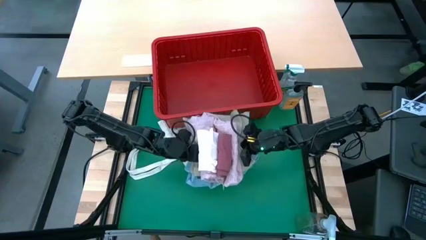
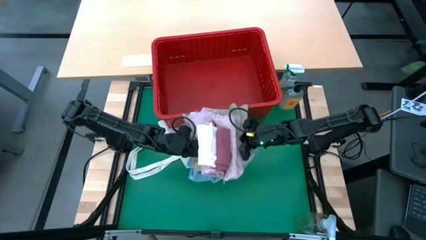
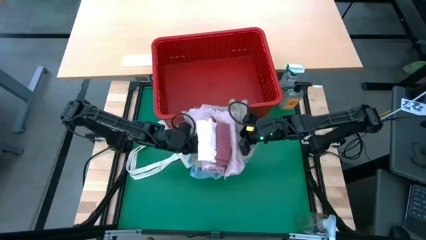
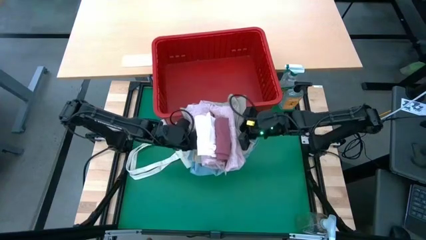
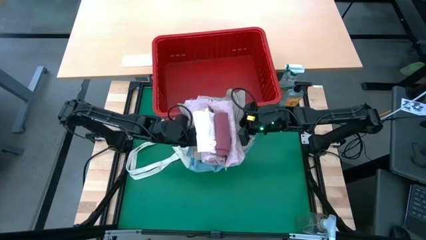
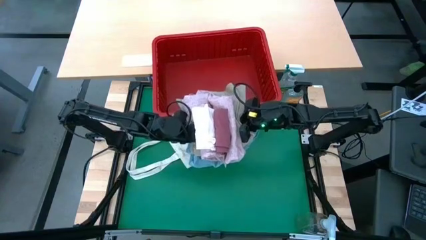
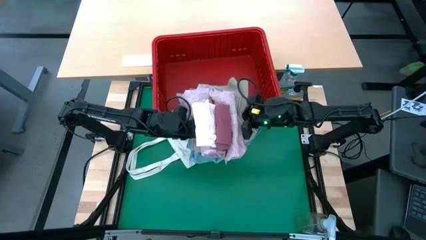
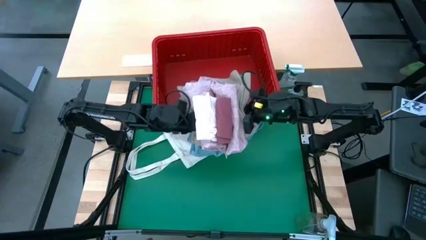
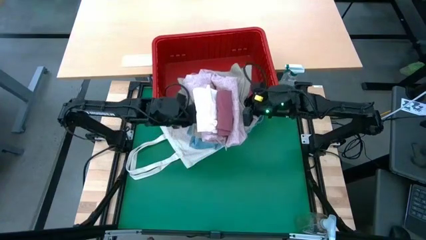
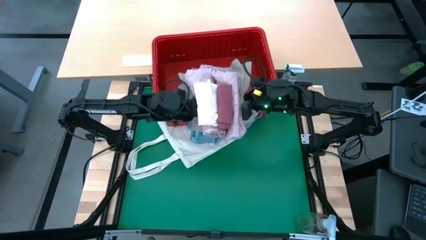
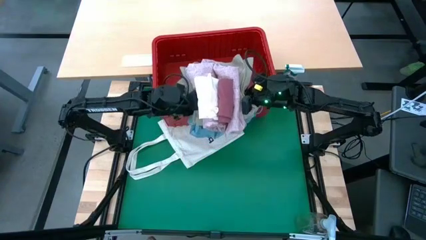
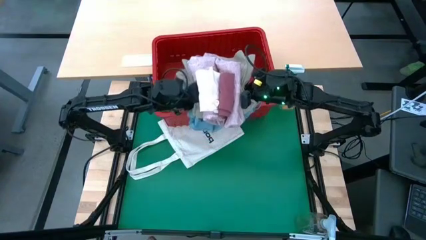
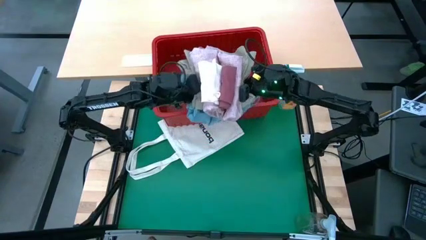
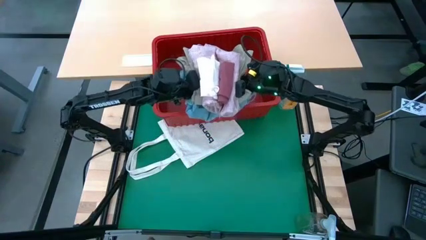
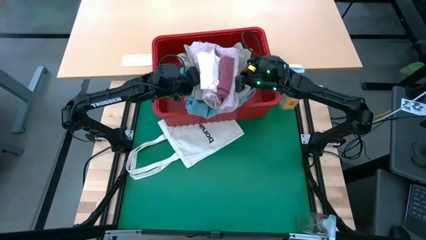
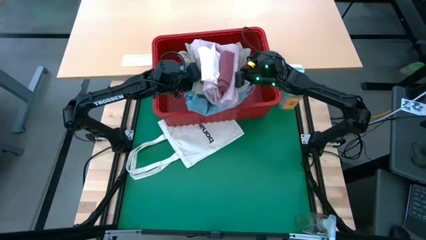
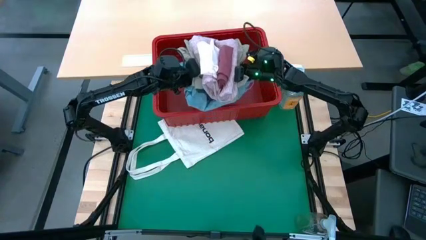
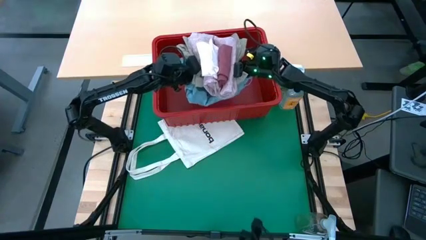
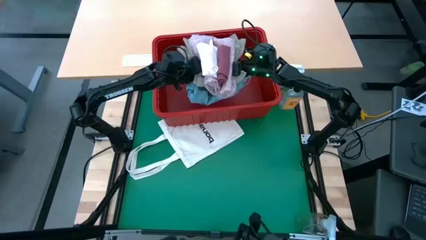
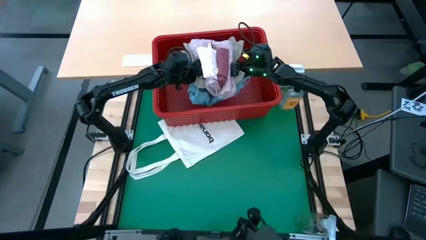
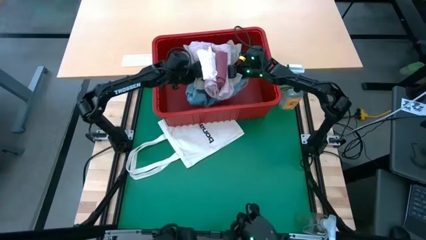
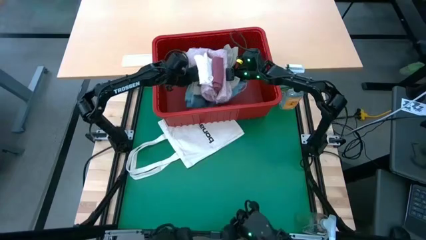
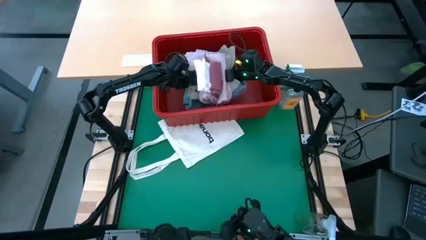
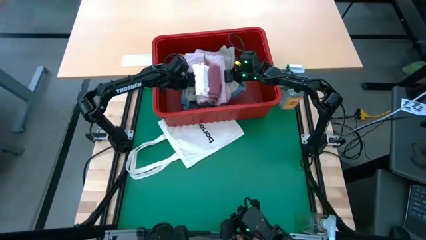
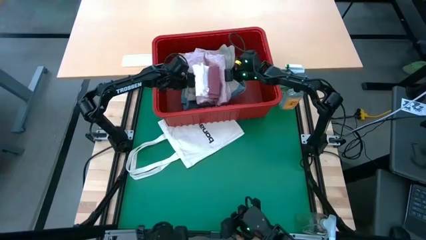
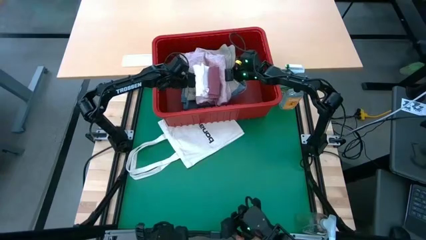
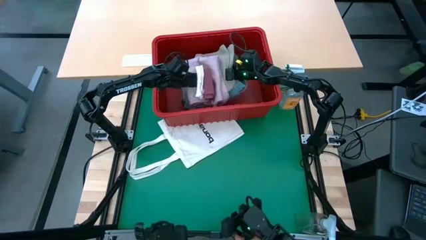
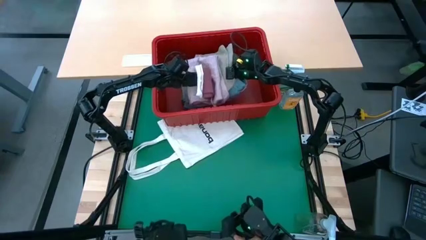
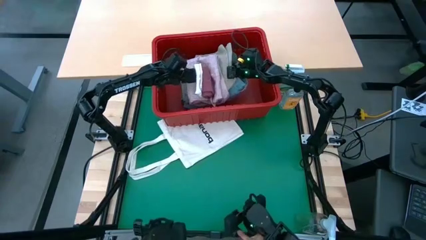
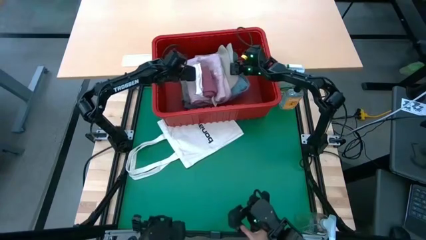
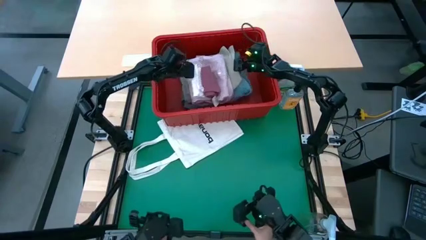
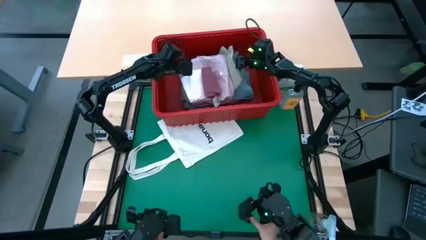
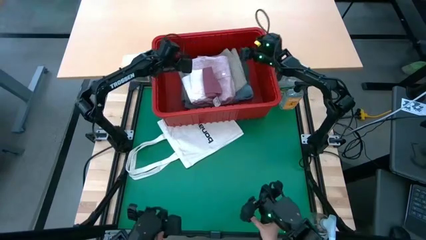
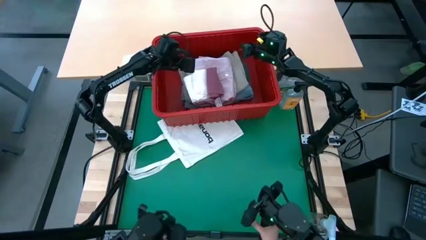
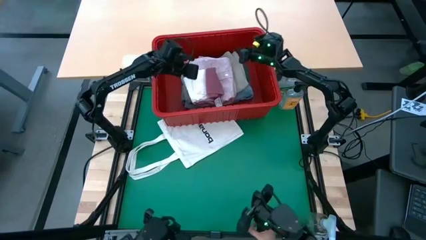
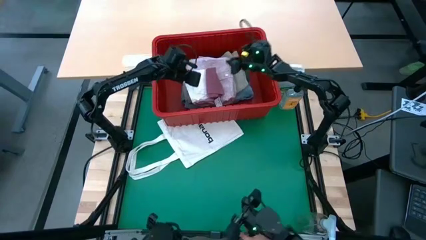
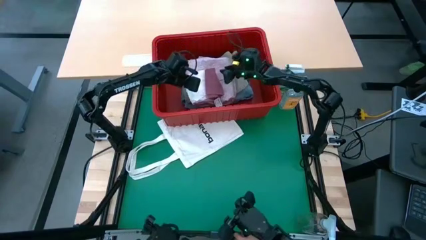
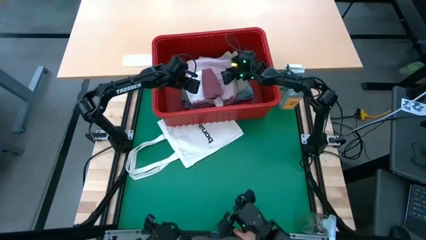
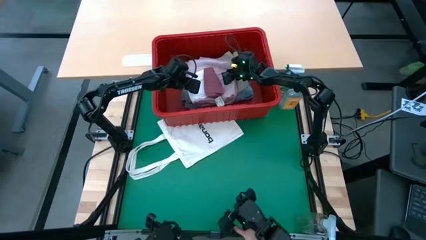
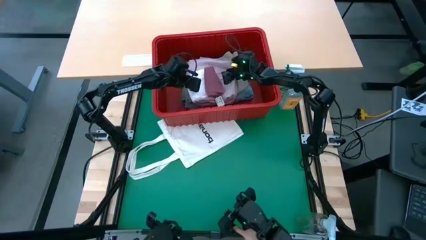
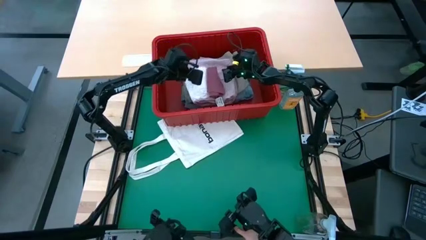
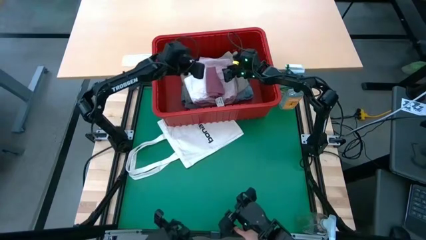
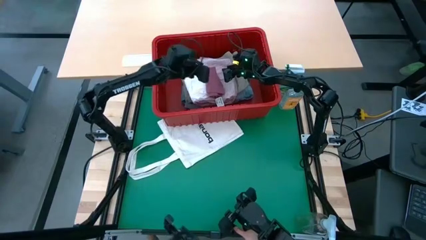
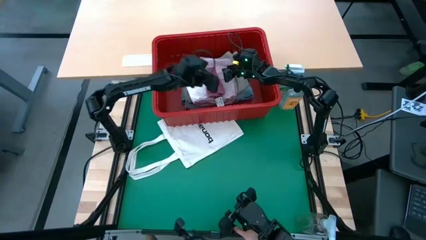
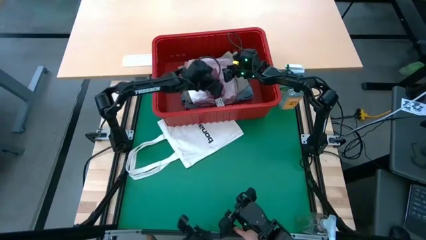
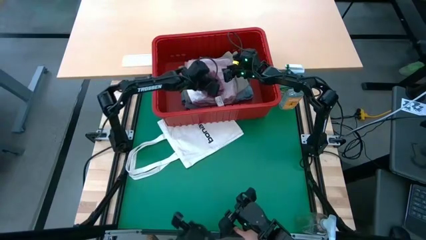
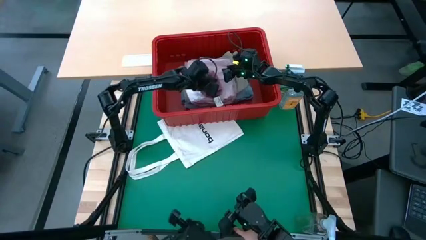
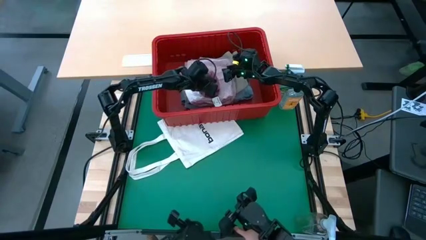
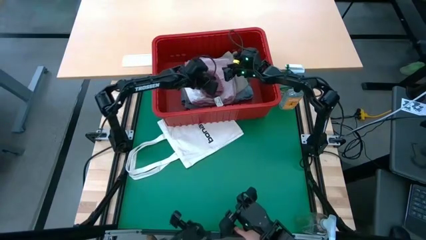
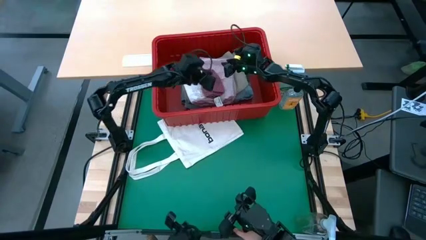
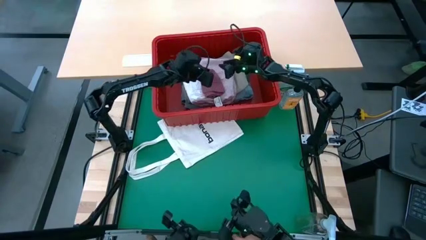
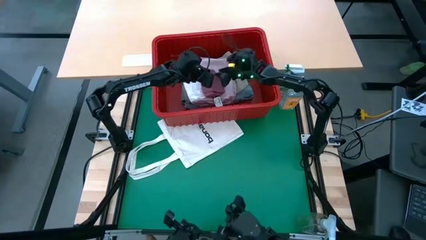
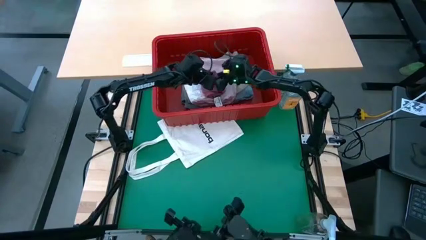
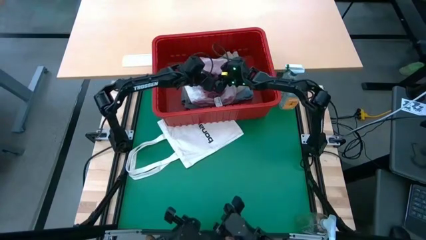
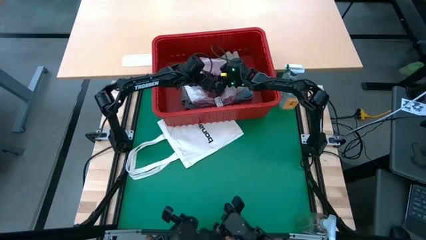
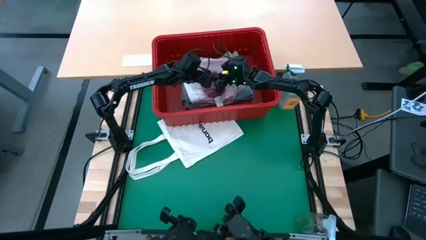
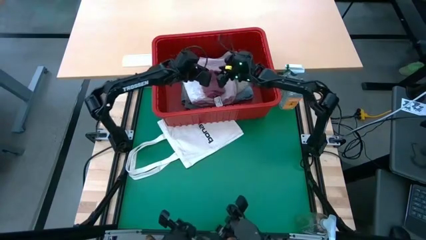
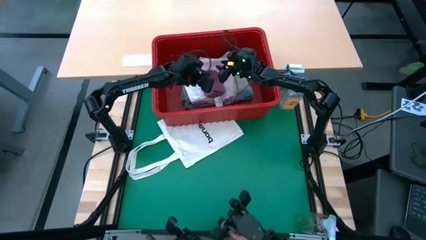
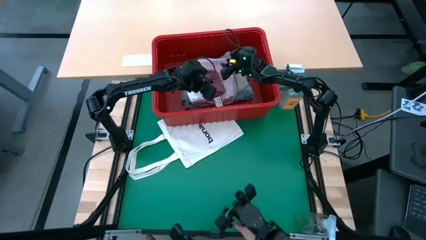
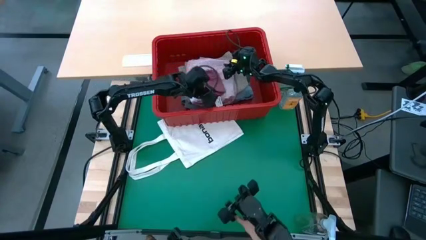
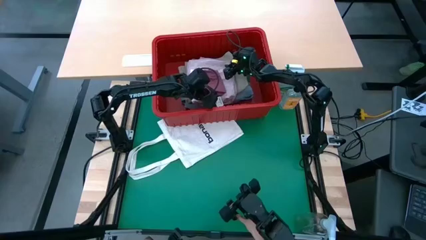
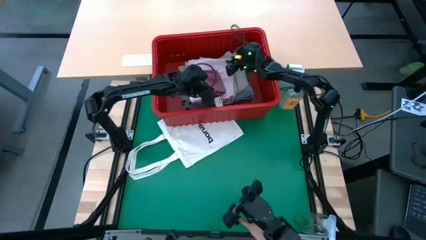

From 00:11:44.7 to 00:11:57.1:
Task: Fold laundry
Put the stacked clothes into the red bin

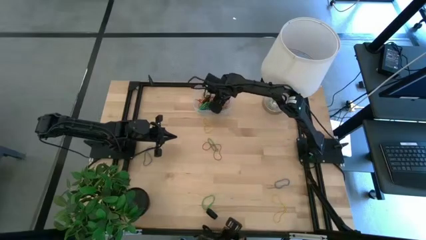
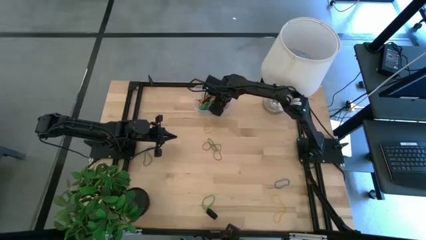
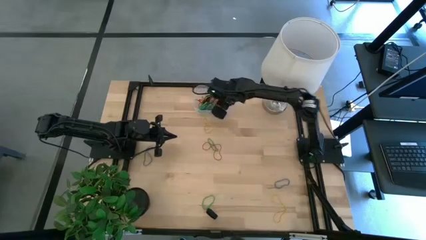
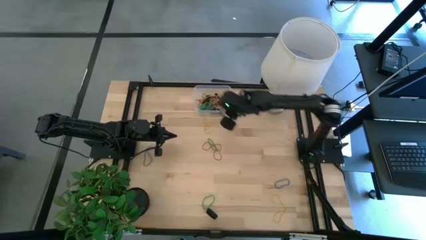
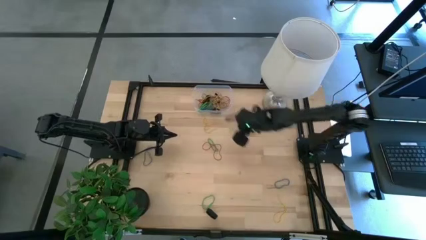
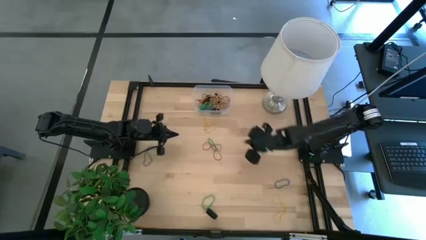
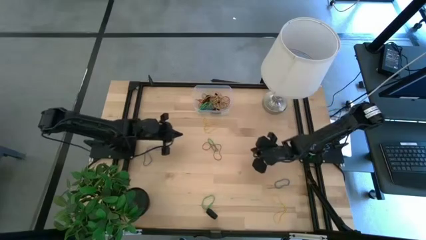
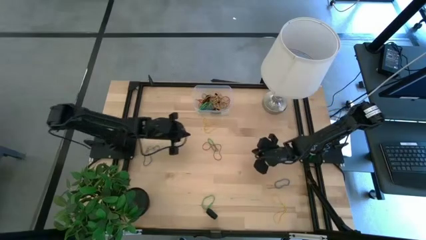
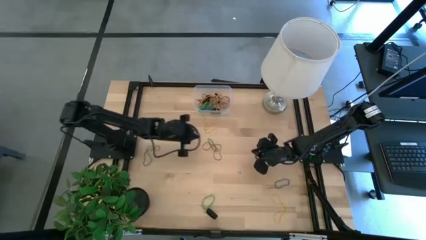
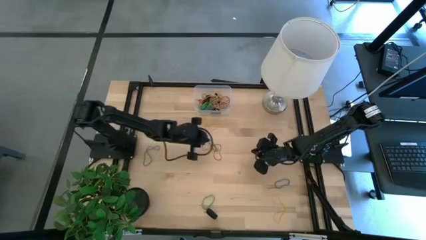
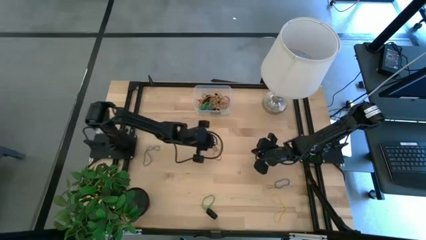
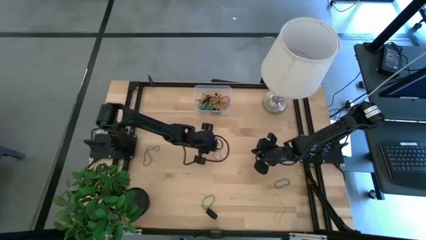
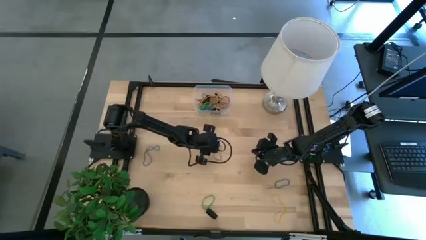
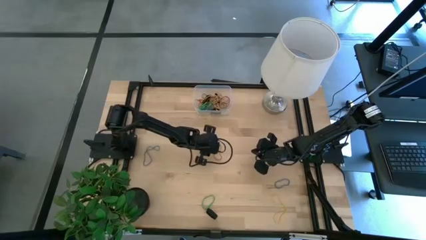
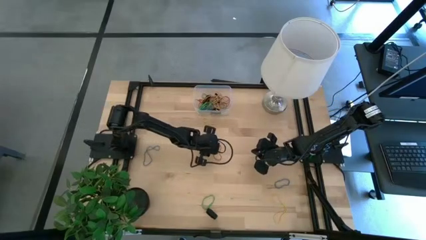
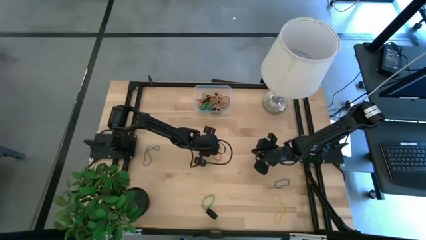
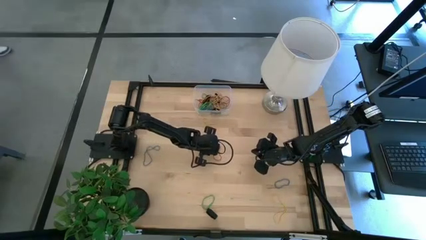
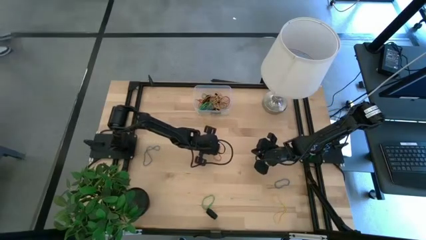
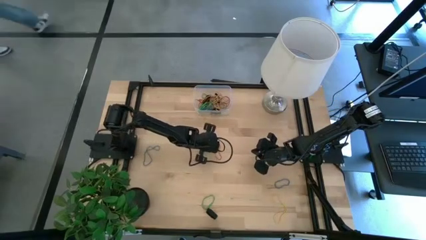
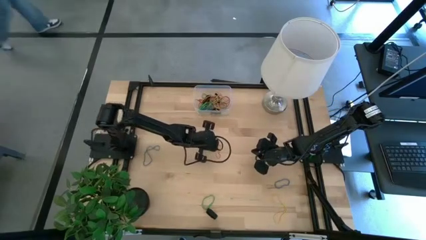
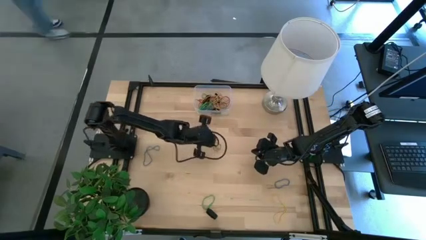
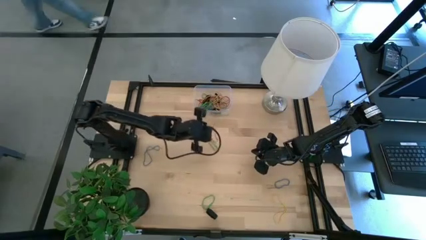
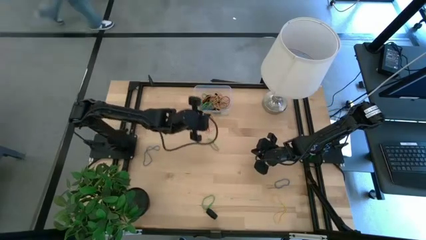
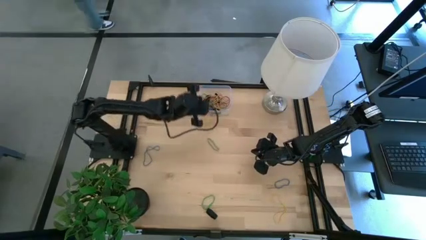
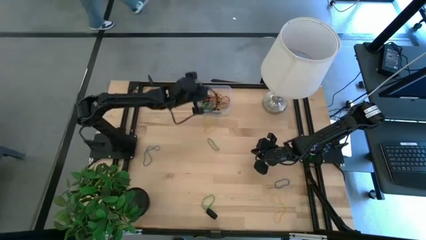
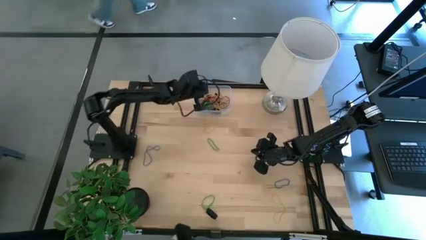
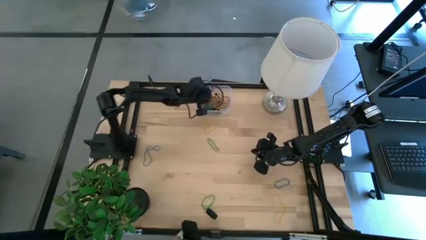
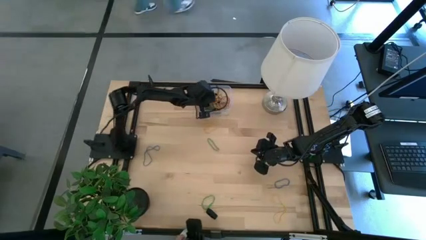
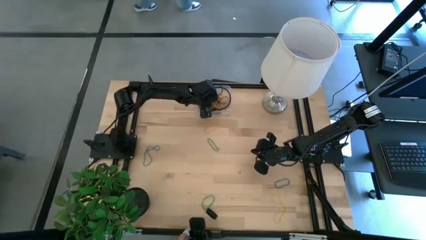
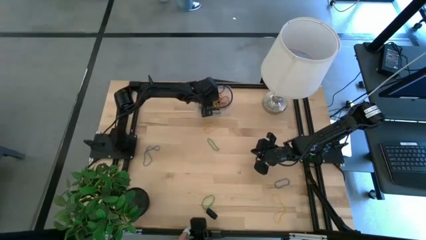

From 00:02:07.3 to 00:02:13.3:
Task: Pick and place rubber bands into bin
Put the red rubber band into the transparent bin
